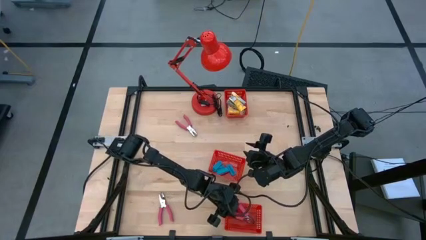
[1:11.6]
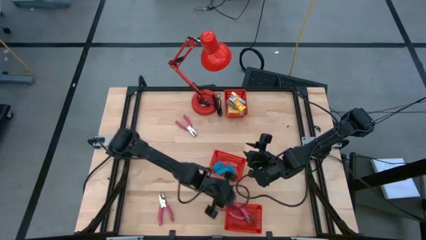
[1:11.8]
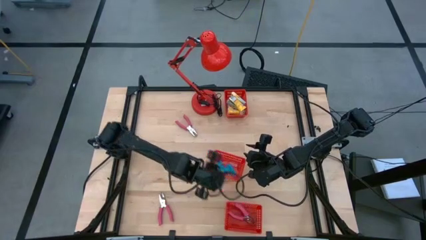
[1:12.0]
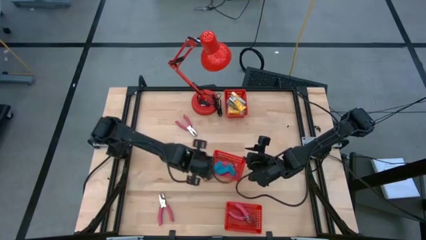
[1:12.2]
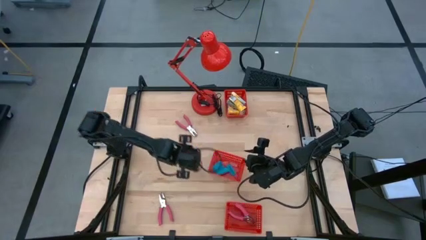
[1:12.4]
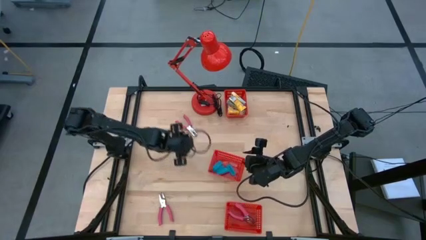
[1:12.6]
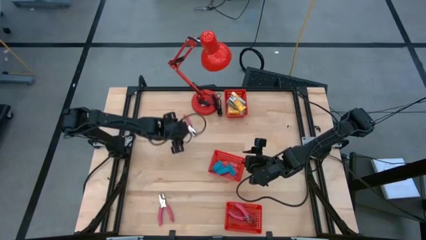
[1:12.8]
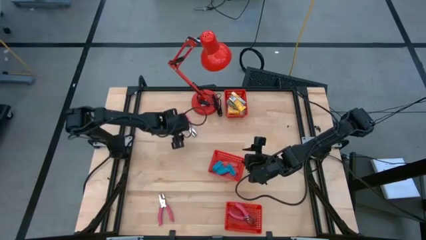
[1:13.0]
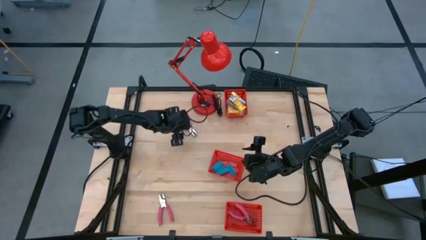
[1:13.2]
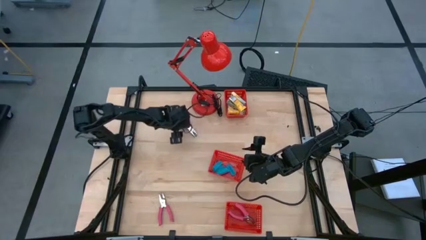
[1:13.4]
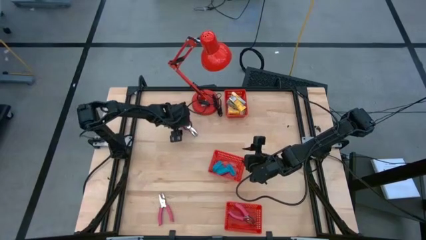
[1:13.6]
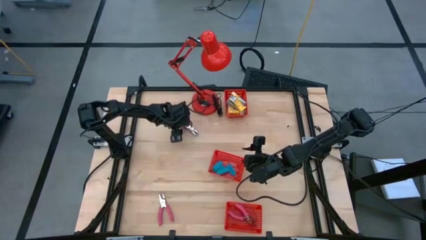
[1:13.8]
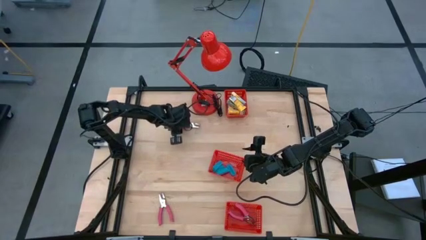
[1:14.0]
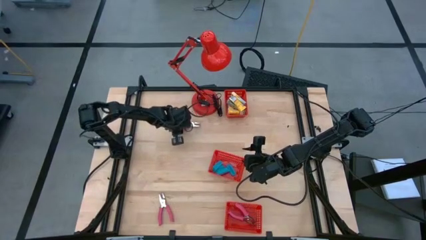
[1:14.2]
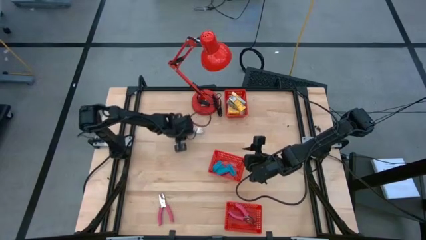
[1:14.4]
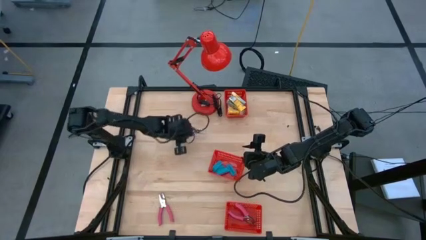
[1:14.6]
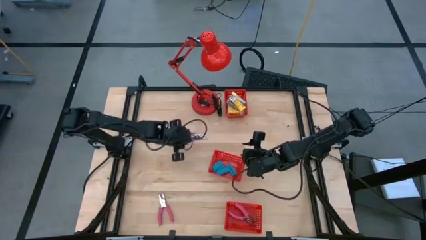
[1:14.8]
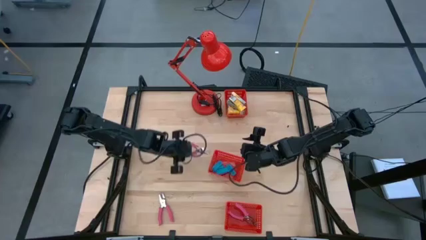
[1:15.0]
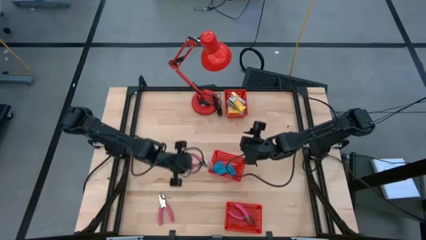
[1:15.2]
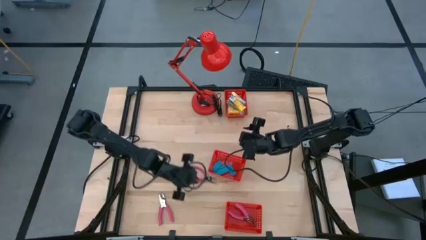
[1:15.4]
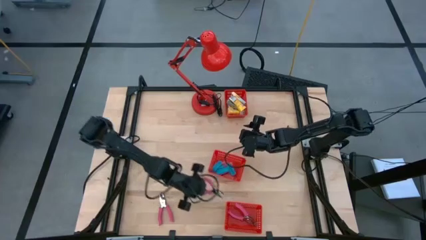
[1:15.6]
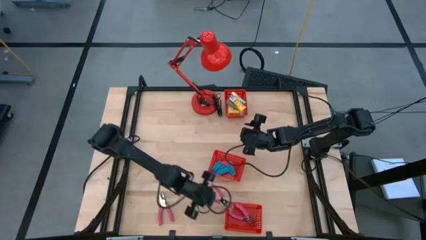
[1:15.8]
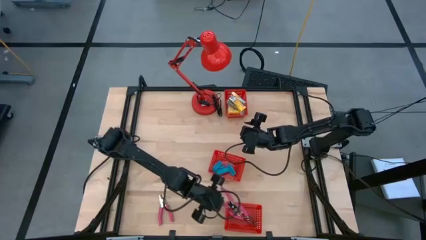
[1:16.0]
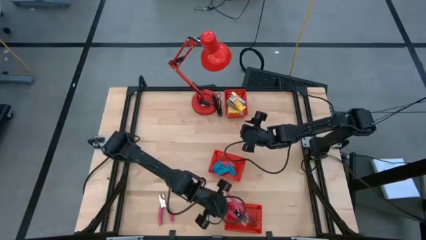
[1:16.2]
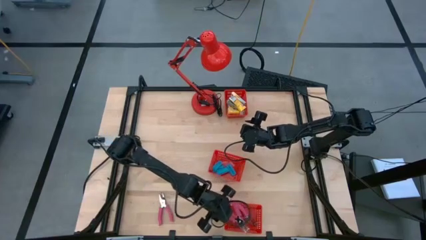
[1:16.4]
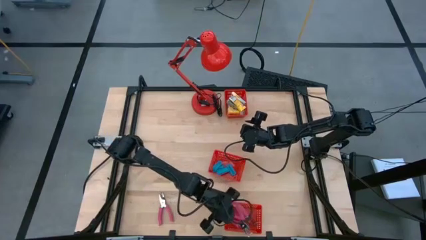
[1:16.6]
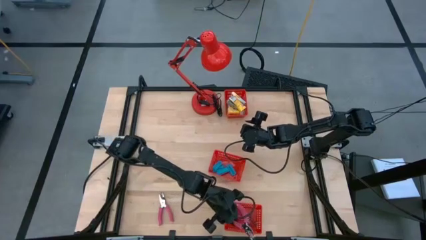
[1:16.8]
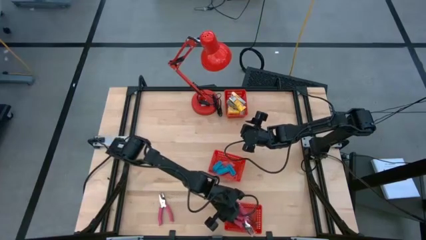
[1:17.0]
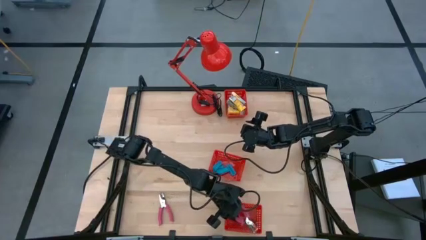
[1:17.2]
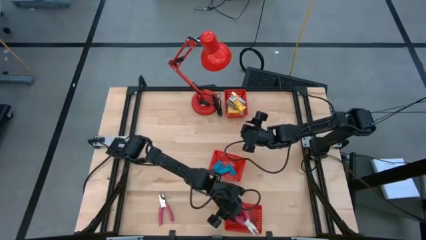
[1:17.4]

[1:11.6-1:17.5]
Task: Pick & Place School Supplies
Put the pink hole puncher into the bottom red basket

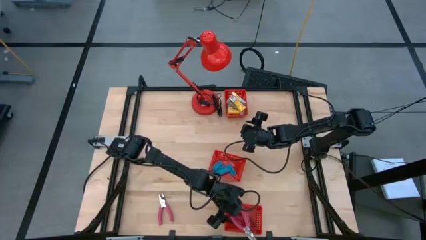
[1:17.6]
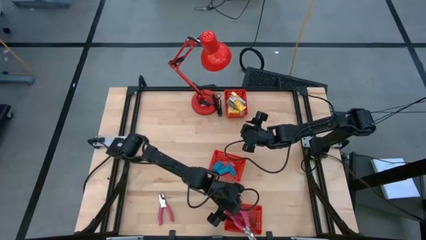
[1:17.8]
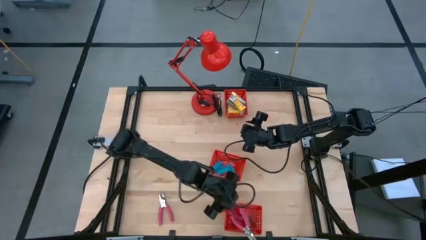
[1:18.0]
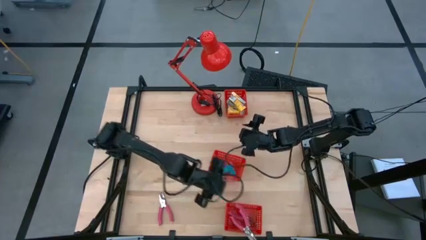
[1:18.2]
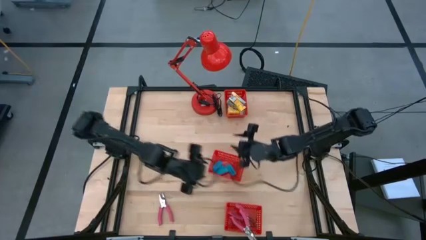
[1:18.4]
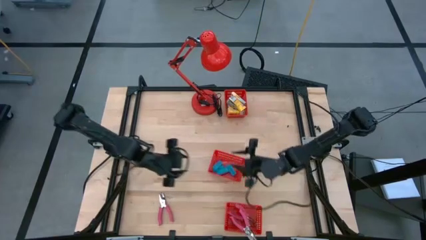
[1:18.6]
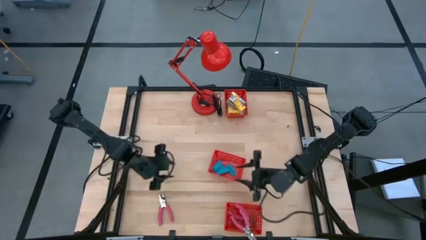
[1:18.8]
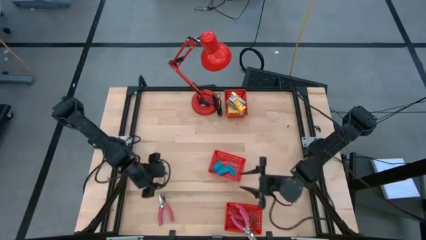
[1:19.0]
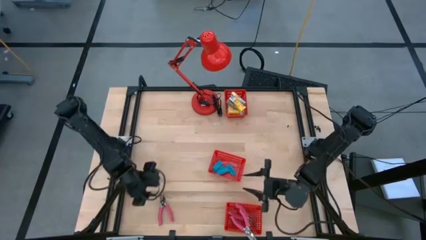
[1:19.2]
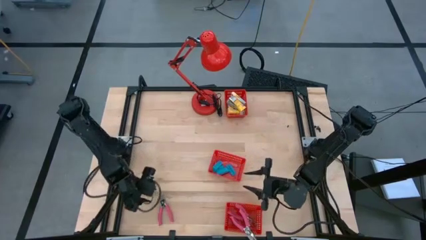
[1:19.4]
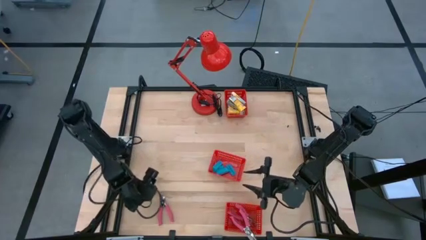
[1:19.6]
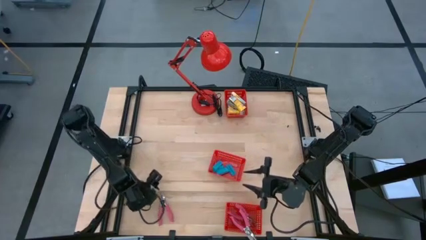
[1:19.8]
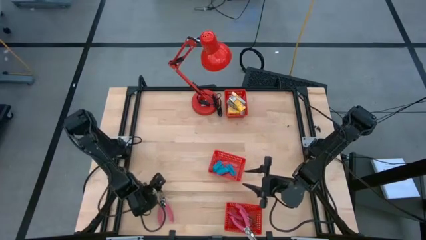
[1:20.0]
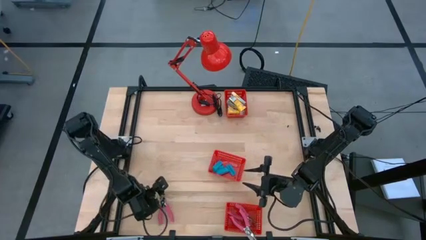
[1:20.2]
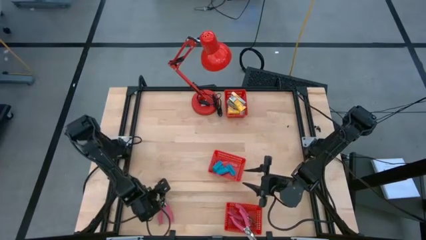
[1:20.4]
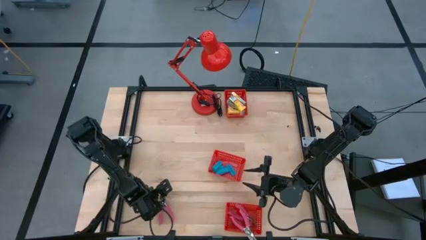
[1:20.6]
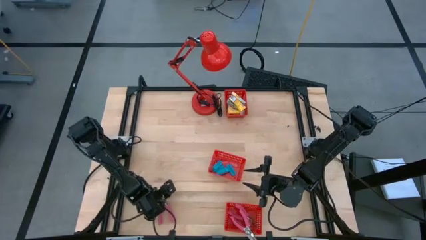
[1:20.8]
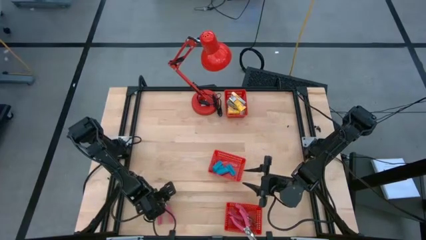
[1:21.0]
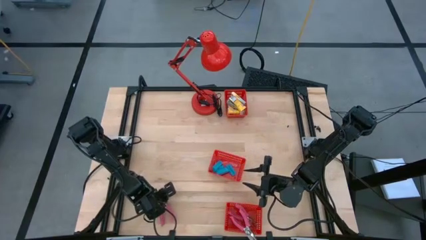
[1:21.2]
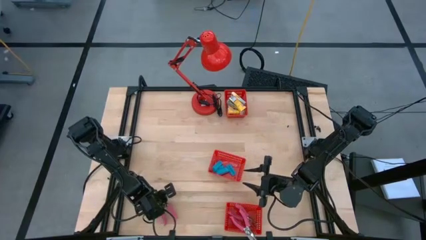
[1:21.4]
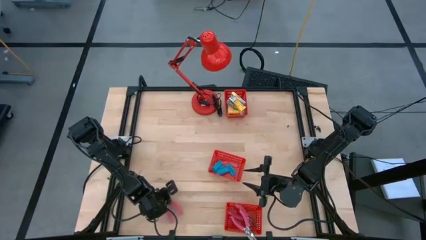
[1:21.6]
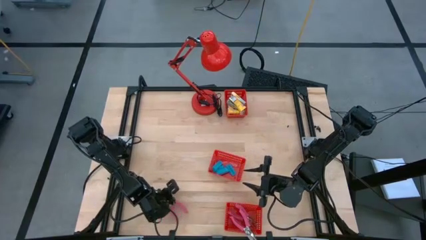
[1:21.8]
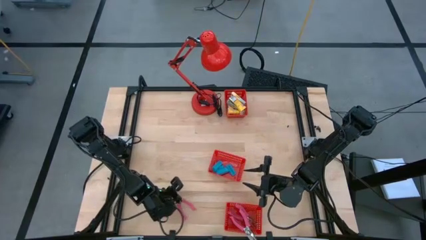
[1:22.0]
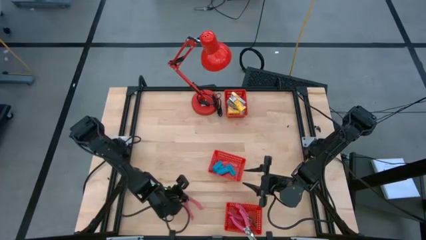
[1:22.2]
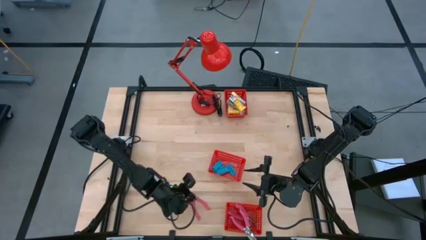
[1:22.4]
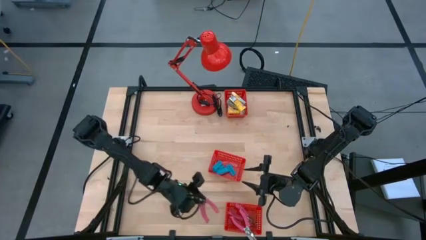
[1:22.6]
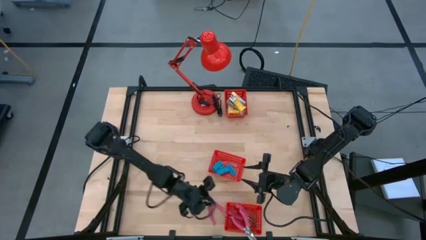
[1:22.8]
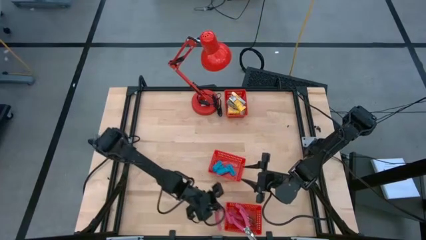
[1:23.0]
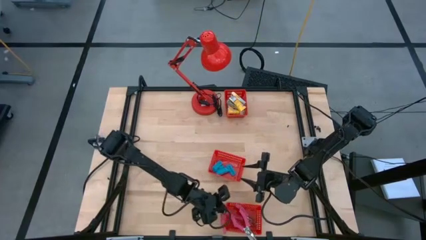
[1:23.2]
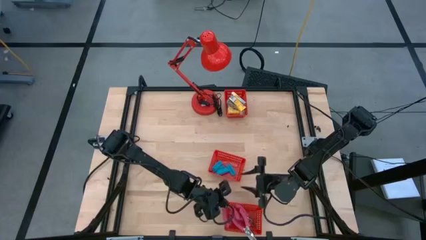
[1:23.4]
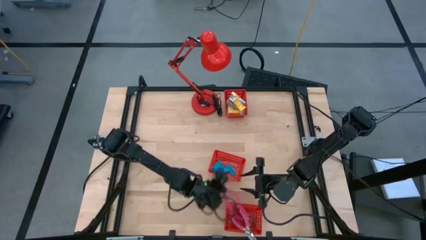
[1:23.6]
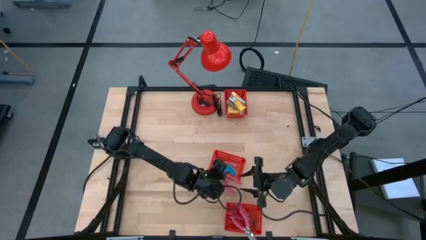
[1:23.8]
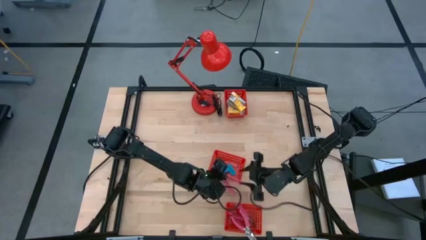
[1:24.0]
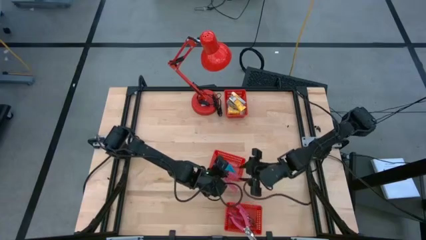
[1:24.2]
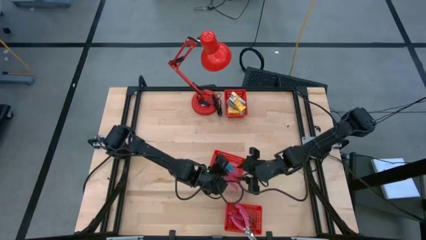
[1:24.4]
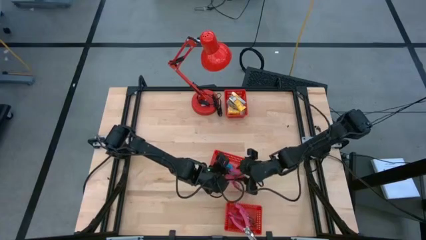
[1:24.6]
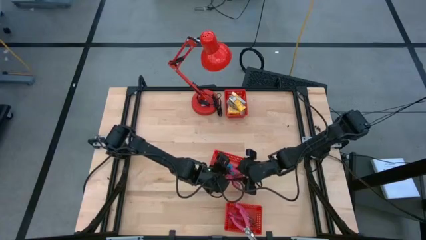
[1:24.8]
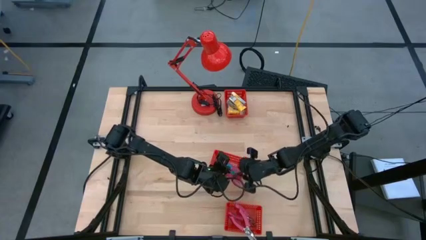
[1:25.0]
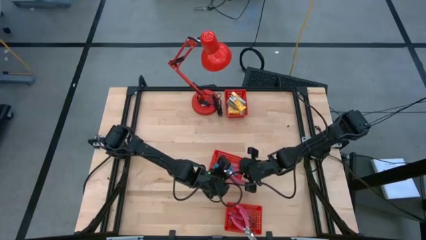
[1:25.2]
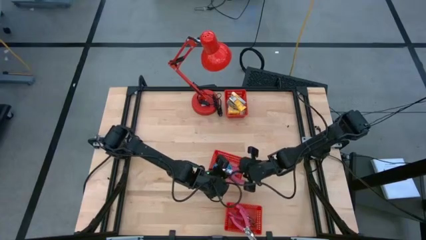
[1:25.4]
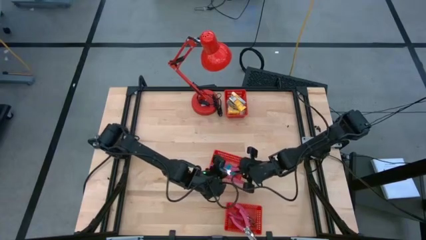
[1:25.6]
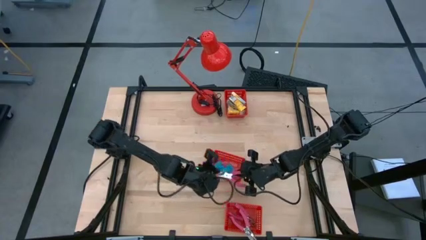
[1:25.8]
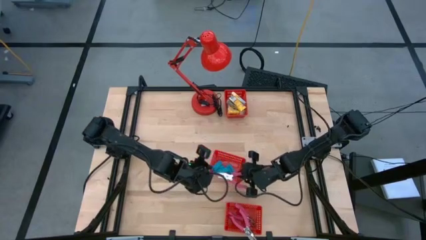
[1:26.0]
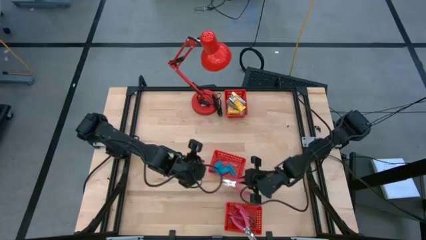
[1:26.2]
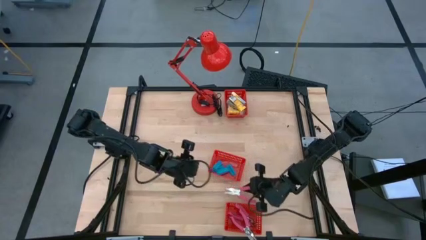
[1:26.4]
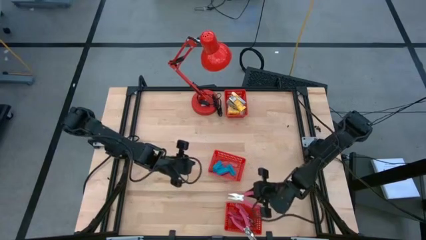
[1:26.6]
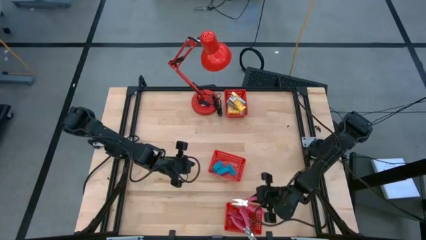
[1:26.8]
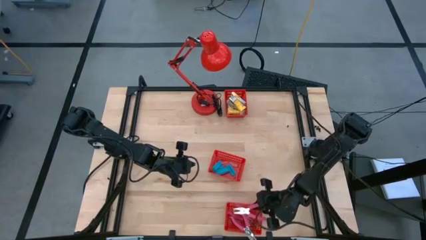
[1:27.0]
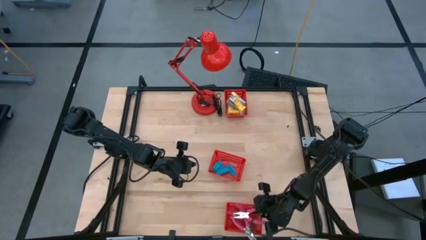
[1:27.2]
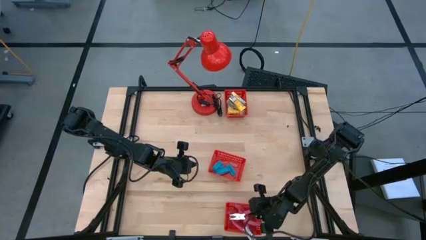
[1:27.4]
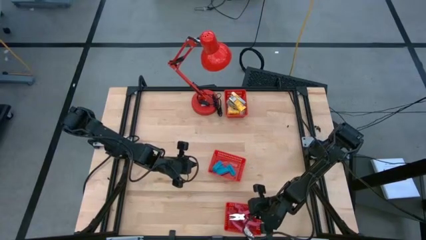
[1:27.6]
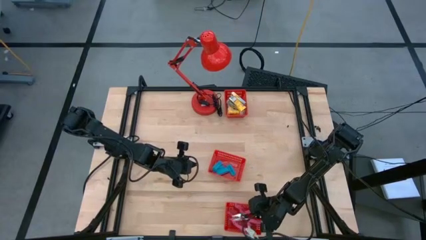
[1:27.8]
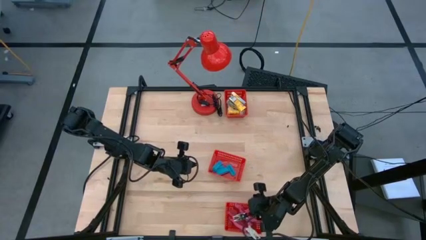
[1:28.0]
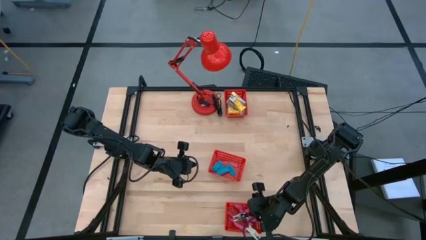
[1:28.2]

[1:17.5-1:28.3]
Put the pink puncher into the bottom red basket
